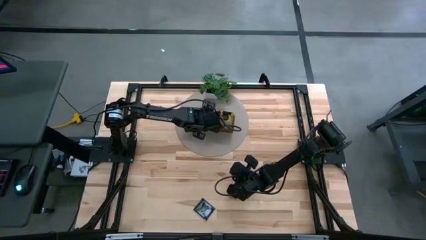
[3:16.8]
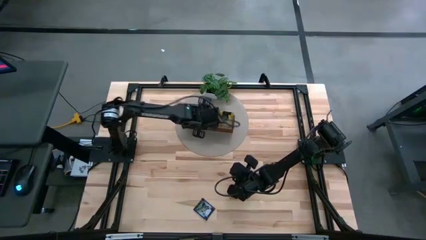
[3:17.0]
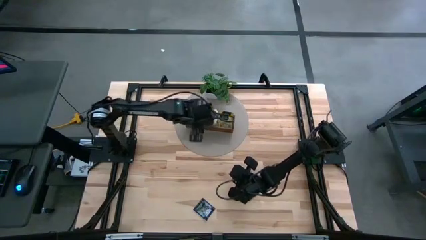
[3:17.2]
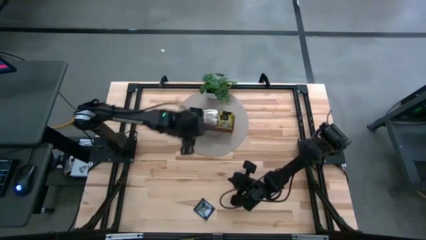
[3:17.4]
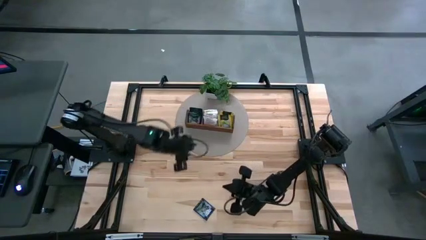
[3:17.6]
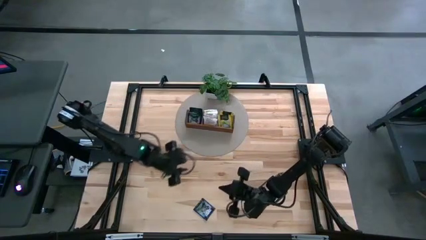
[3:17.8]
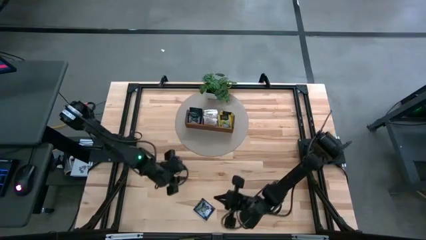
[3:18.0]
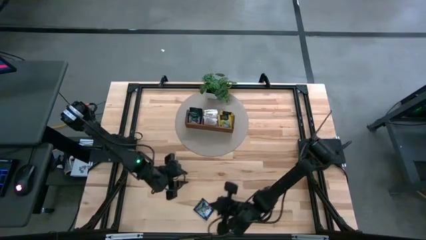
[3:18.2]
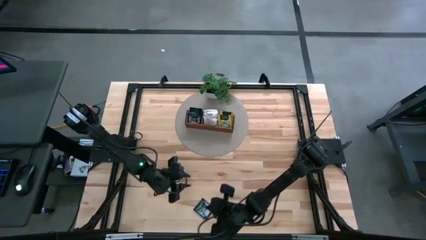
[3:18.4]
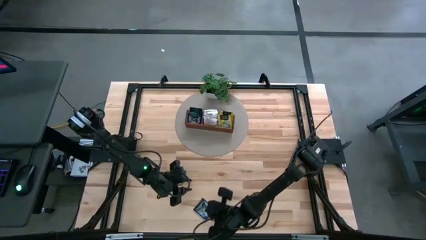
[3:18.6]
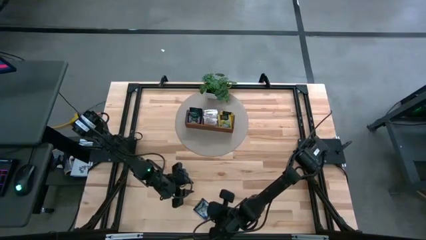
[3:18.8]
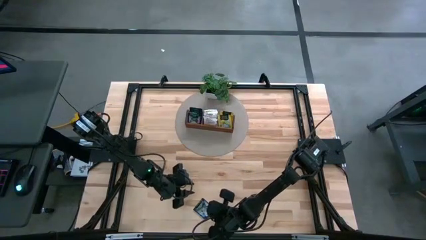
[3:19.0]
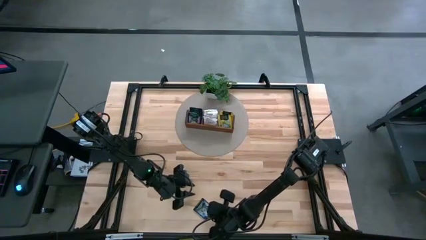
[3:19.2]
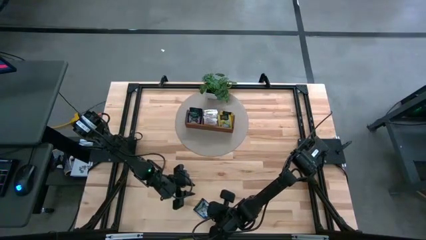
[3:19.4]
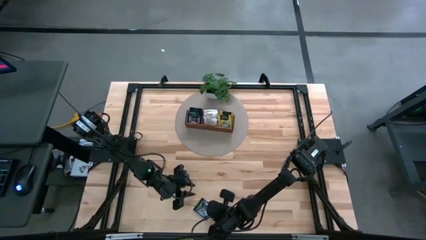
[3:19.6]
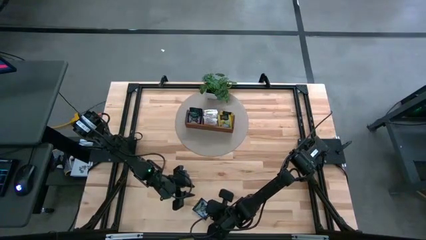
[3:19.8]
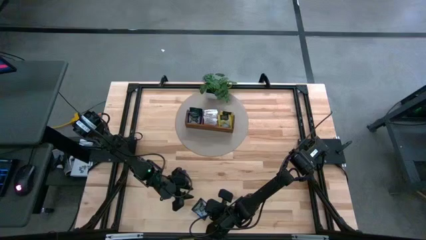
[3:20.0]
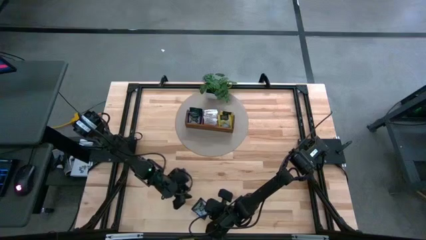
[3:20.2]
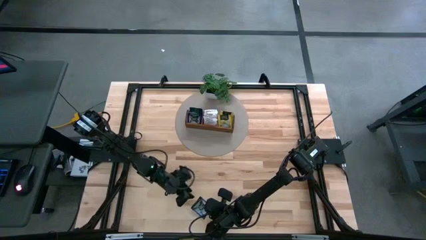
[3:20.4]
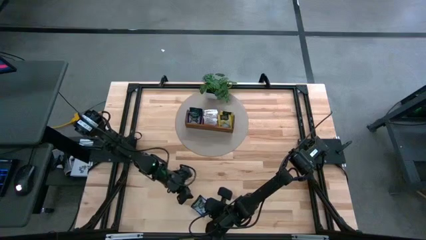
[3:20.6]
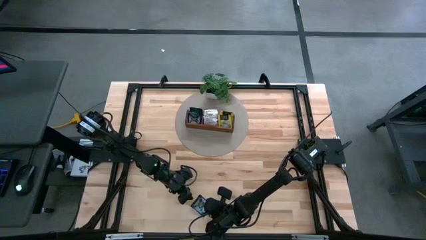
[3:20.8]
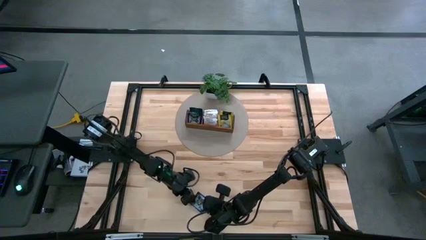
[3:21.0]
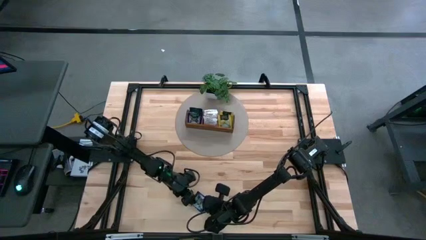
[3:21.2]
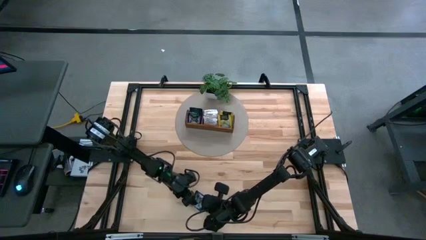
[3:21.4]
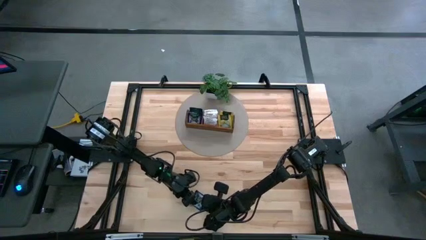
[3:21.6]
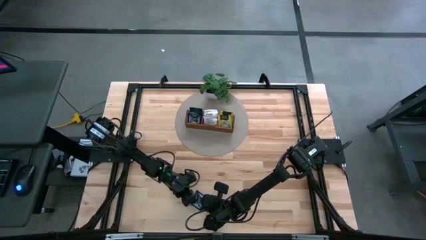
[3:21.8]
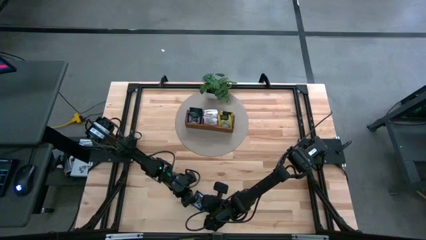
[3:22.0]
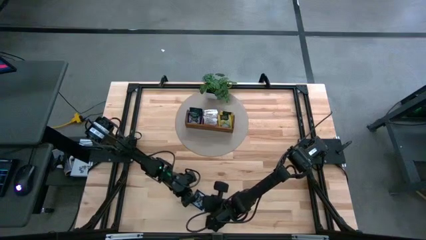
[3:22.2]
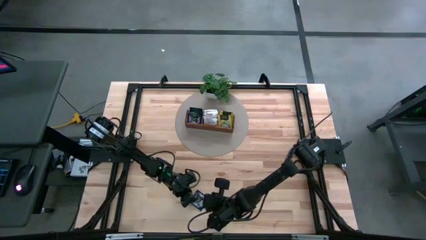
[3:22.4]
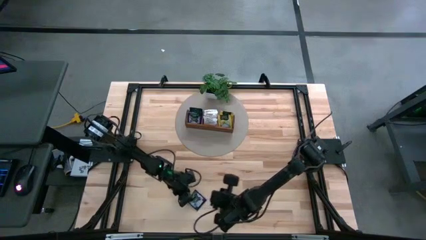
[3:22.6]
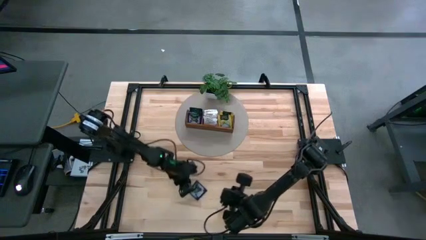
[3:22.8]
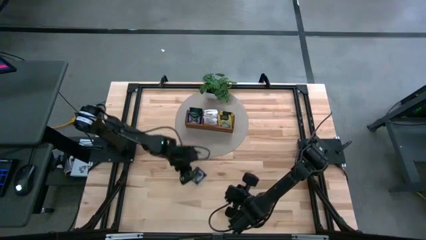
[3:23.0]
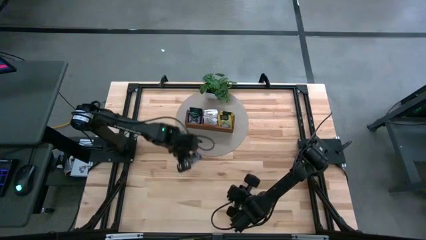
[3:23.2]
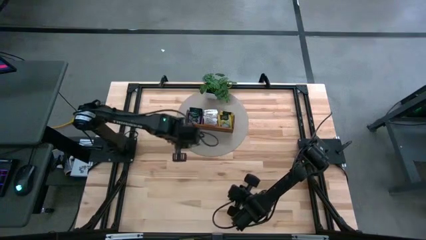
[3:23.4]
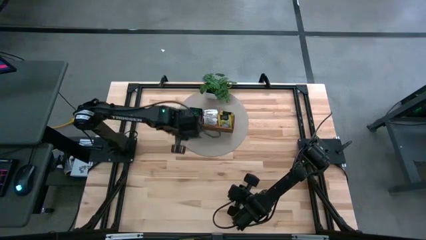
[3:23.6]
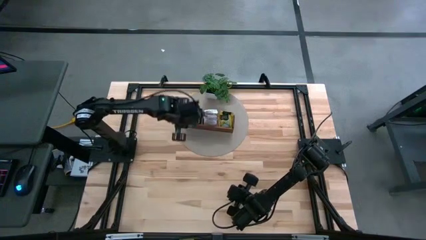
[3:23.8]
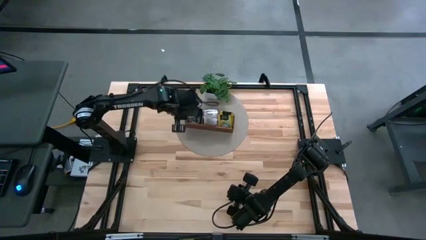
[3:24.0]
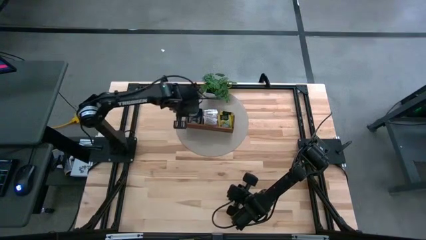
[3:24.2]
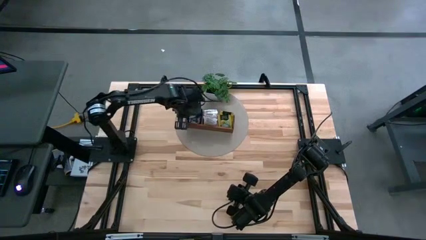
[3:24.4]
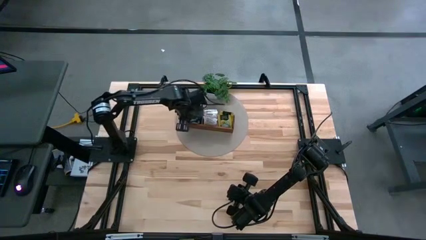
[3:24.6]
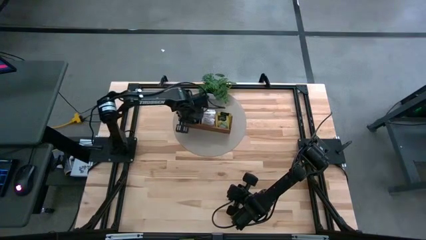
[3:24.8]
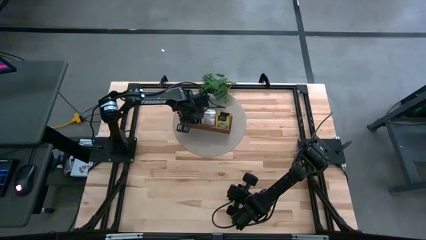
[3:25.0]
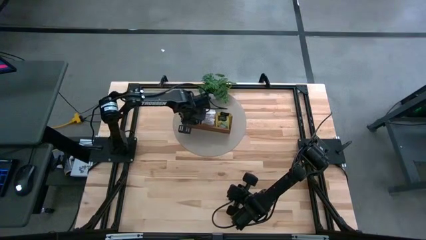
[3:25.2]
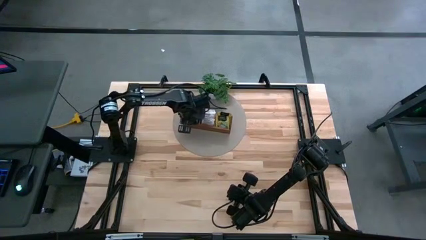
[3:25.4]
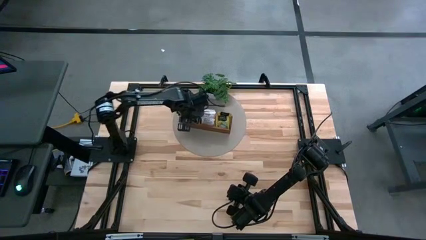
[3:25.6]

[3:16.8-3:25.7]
Task: Pick & Place Tea
Put the purple tea bag into the right section of the wooden organizer

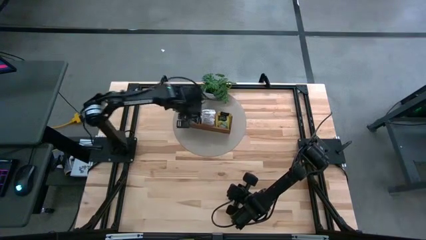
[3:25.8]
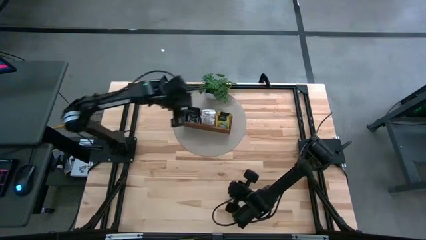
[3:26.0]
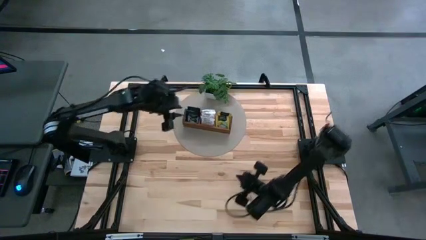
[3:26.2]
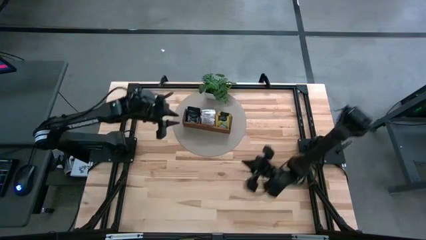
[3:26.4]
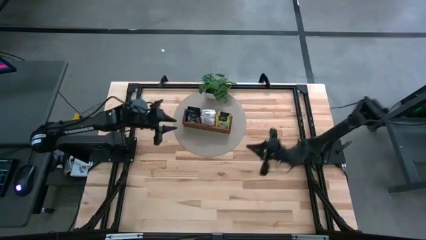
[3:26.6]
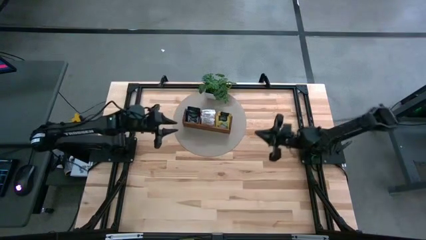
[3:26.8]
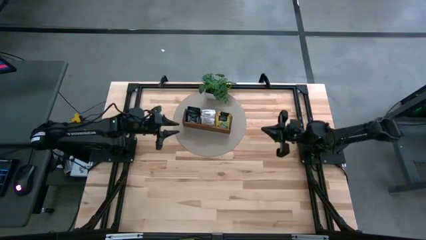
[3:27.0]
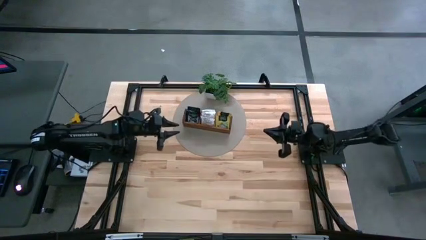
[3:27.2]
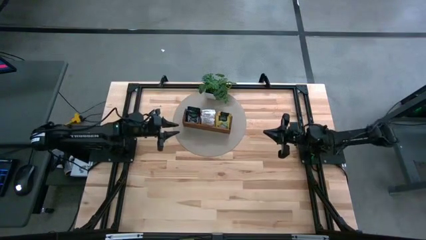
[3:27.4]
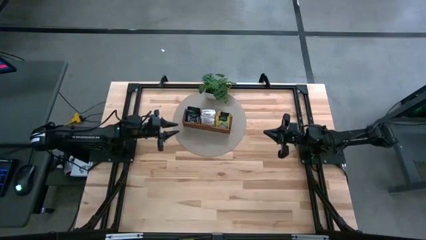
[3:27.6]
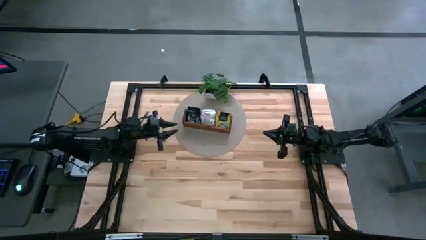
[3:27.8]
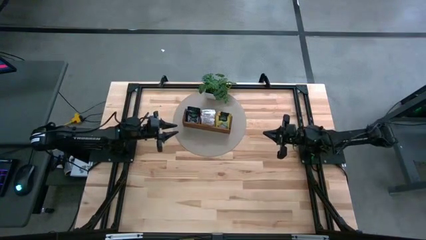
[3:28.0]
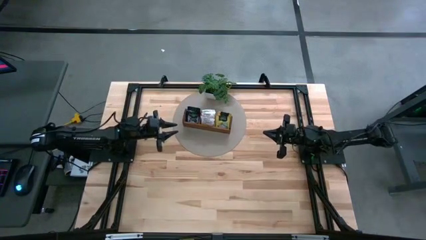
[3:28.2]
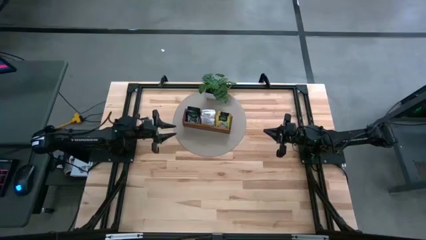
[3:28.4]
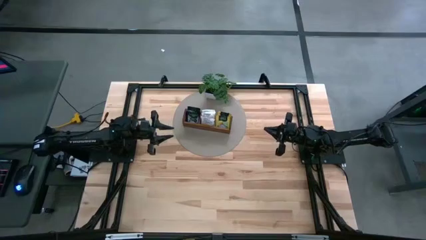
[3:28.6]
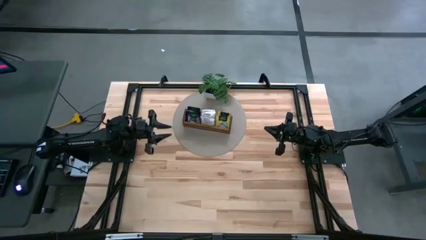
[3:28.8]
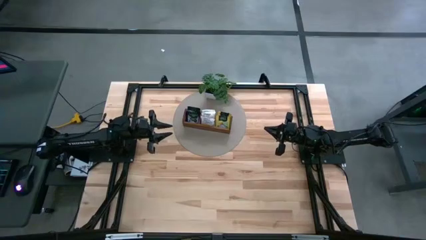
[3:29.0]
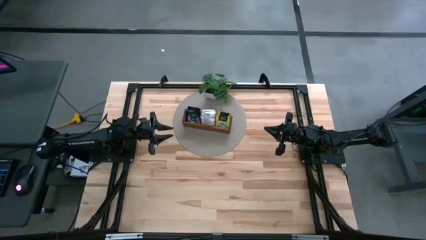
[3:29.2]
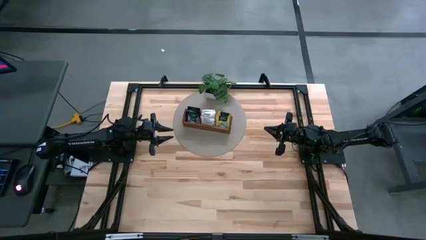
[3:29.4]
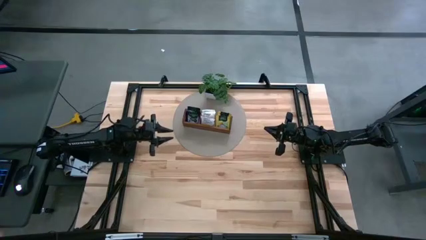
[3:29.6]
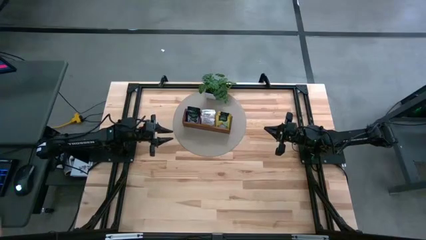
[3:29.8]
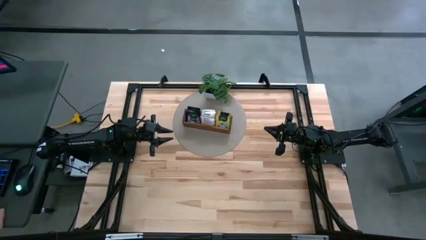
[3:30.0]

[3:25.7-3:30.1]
Return to Home Position

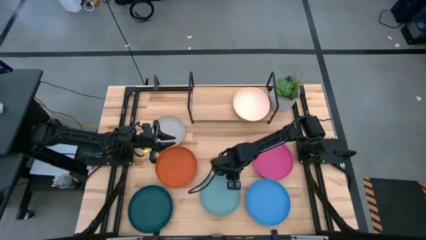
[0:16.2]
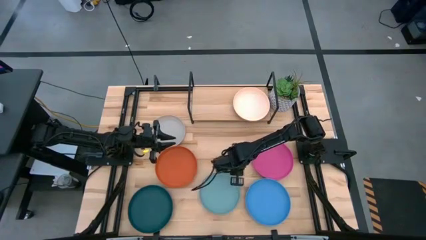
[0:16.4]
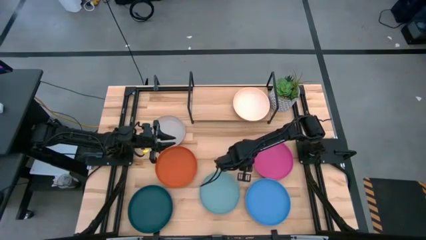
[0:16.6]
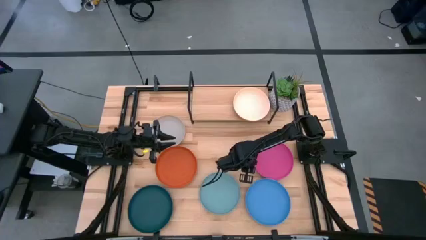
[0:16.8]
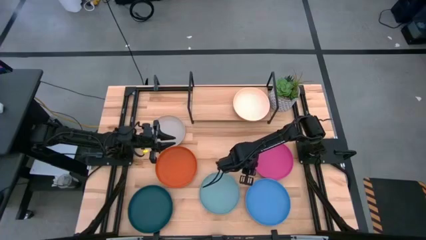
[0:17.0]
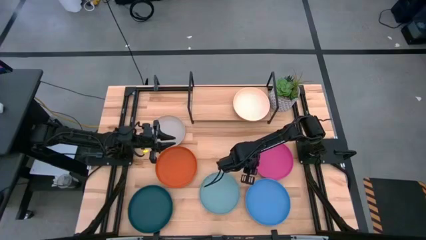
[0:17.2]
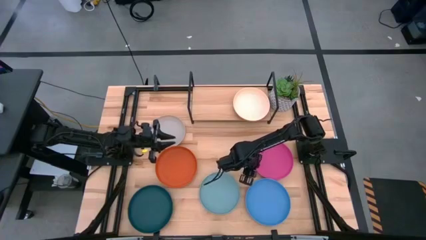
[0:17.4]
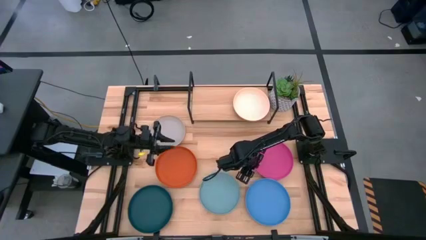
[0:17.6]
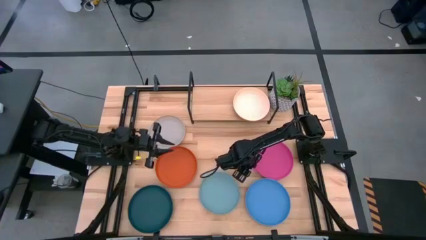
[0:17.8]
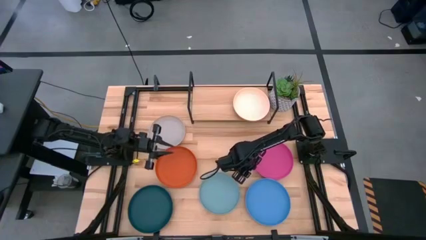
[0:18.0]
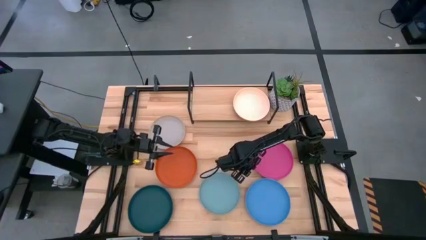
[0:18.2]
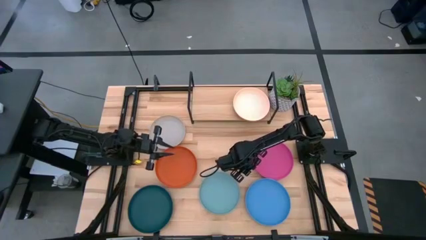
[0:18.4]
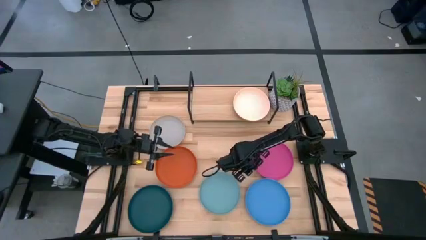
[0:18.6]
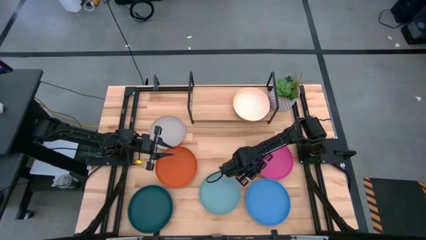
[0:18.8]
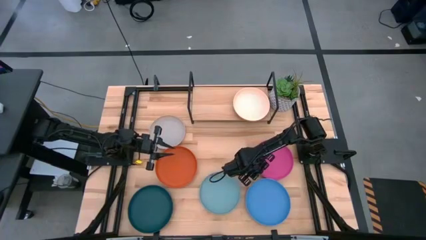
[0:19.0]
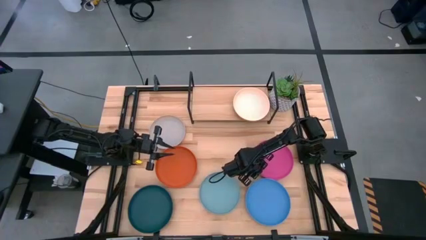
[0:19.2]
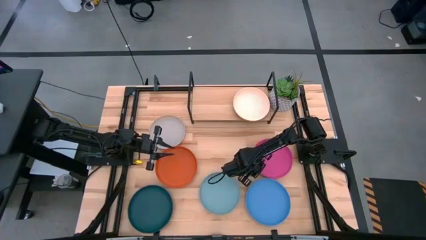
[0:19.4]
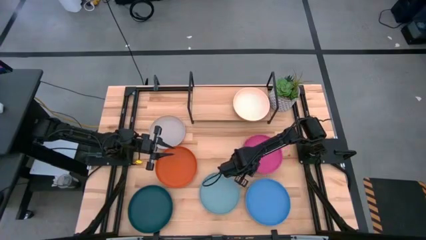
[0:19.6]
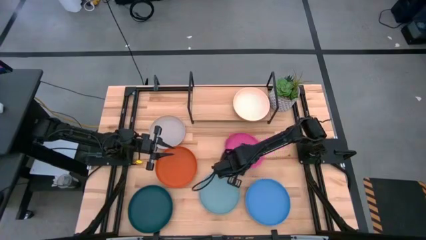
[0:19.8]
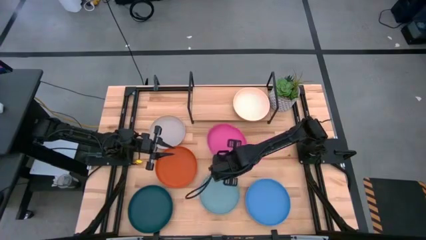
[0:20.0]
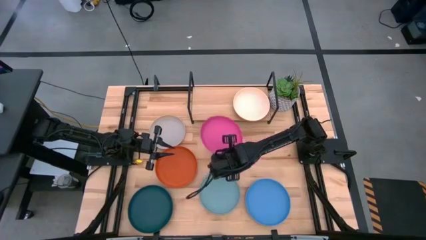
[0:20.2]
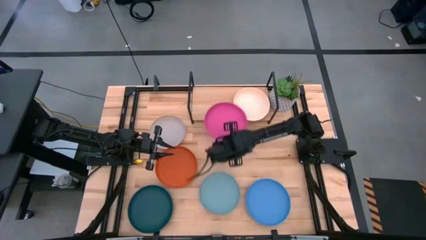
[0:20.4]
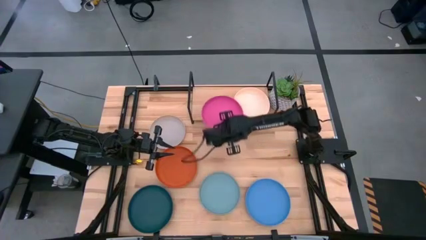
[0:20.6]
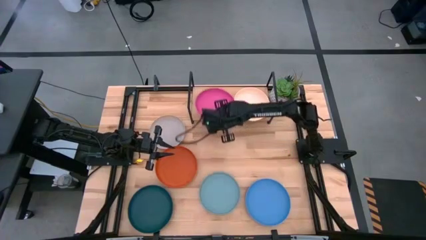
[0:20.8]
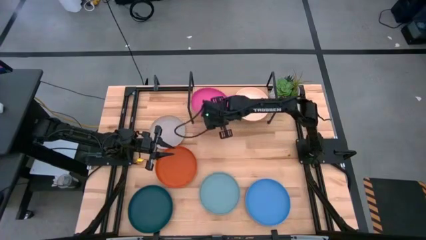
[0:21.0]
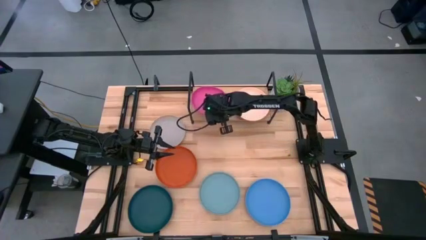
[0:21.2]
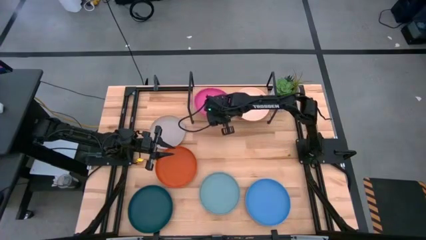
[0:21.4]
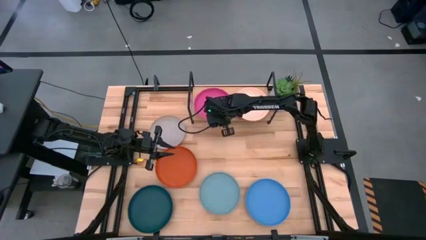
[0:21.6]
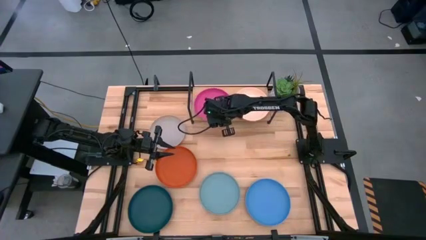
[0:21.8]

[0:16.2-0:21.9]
Task: Place and stack plates onto a shelf
Put the pink plate on the shelf
